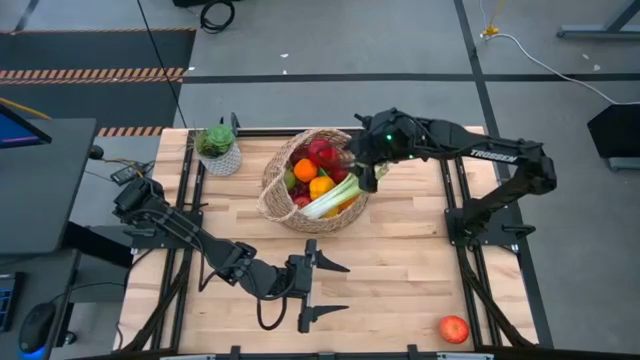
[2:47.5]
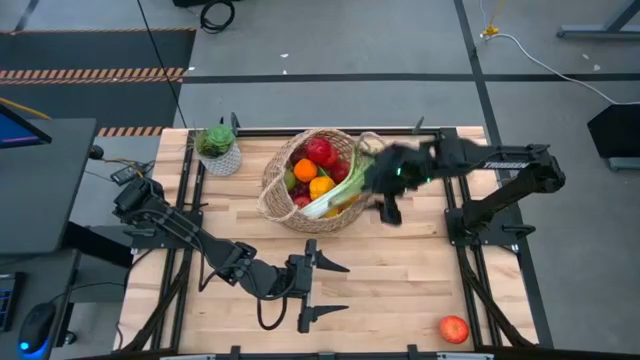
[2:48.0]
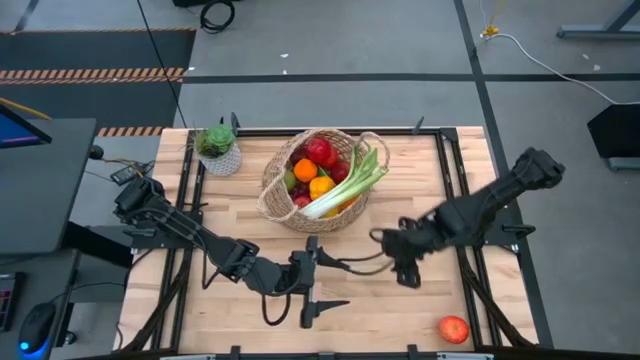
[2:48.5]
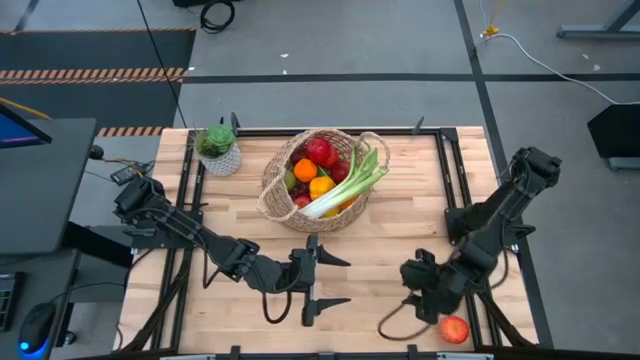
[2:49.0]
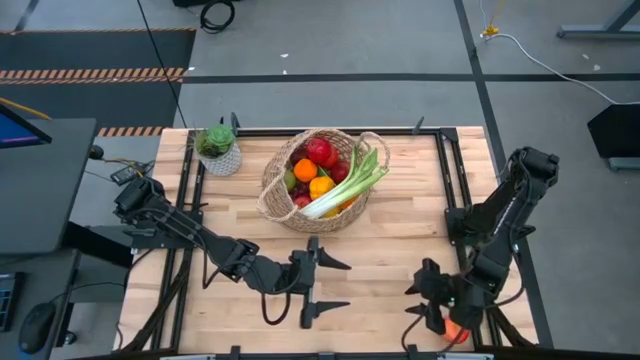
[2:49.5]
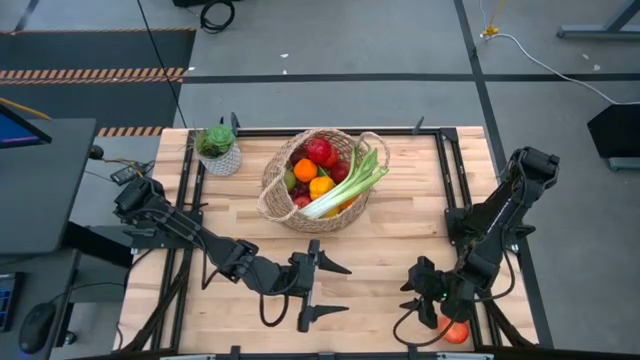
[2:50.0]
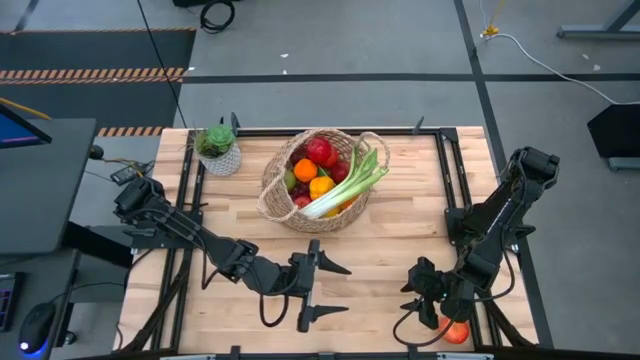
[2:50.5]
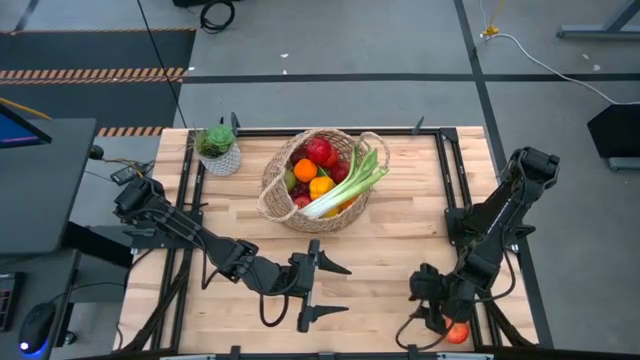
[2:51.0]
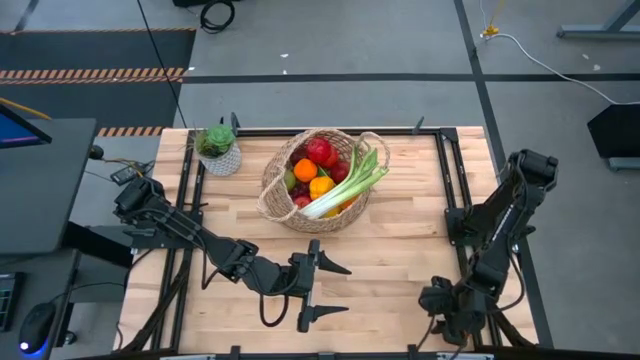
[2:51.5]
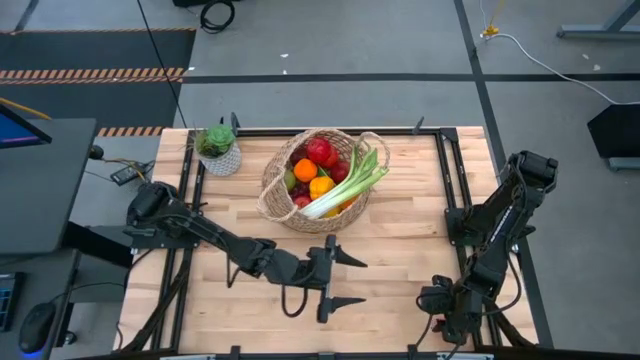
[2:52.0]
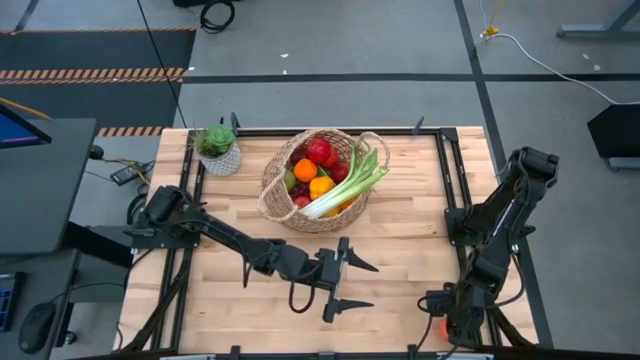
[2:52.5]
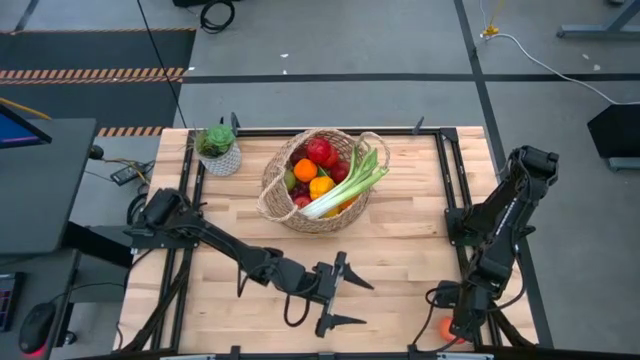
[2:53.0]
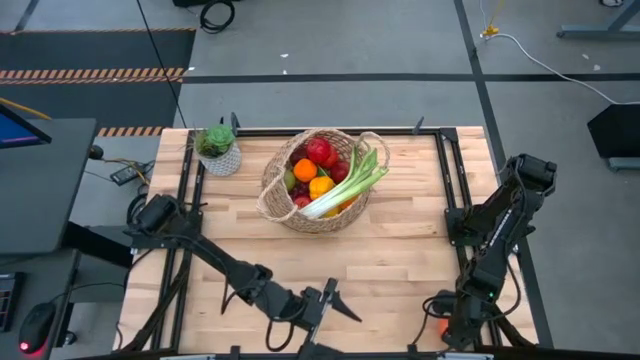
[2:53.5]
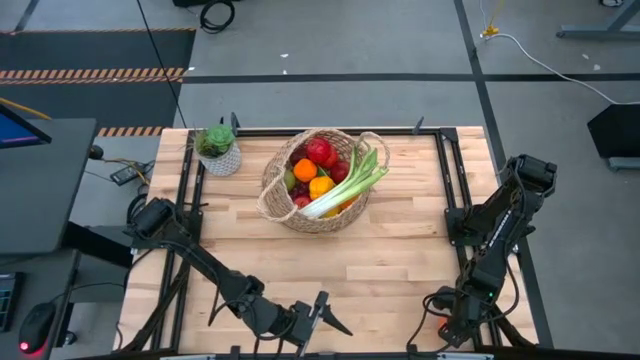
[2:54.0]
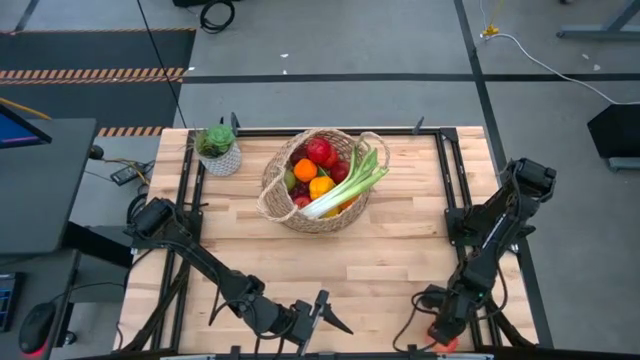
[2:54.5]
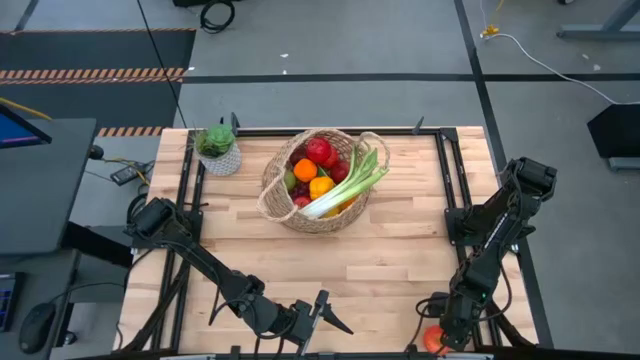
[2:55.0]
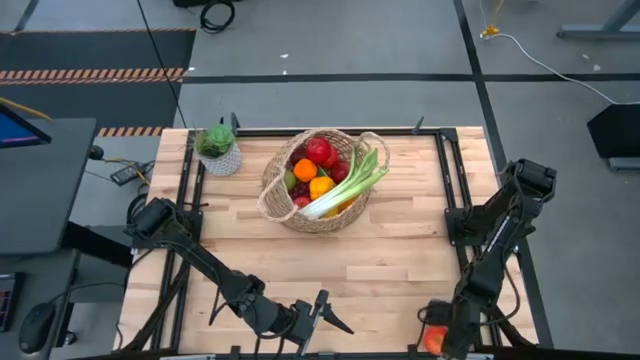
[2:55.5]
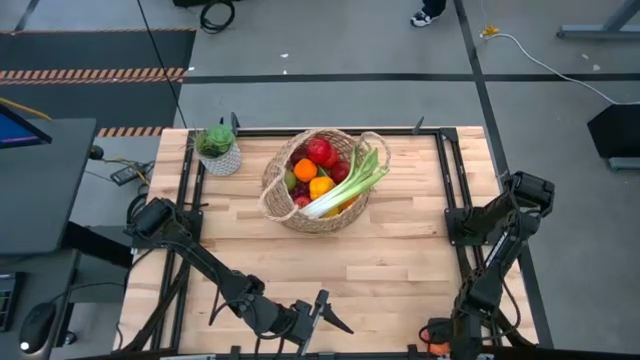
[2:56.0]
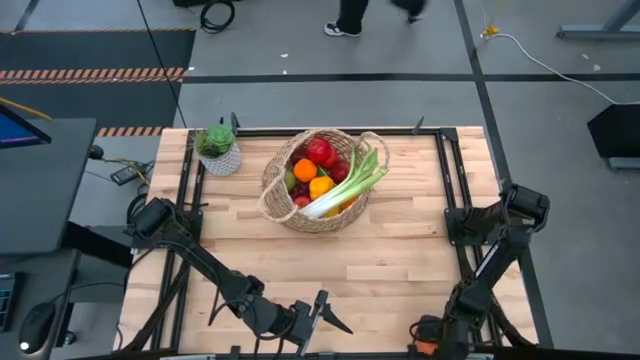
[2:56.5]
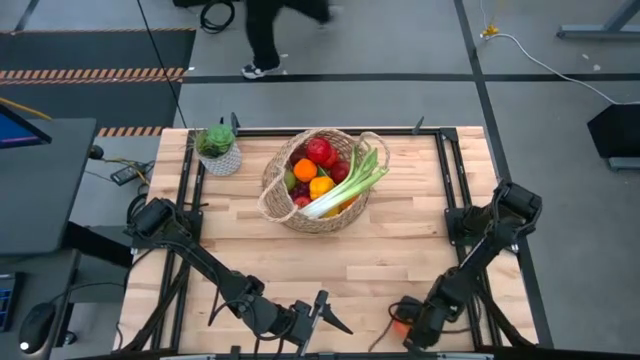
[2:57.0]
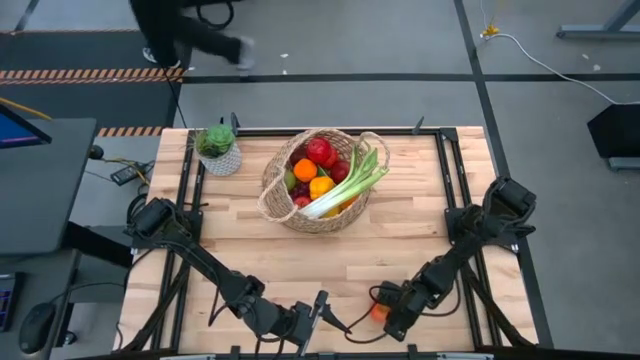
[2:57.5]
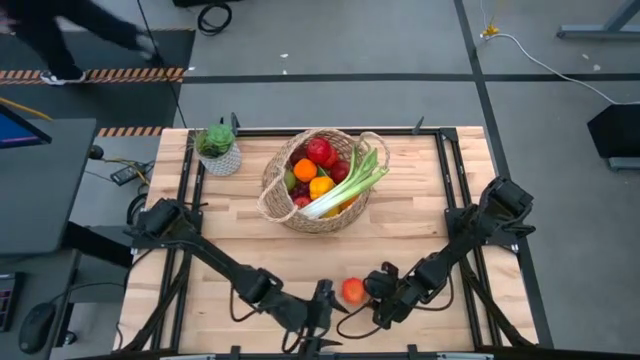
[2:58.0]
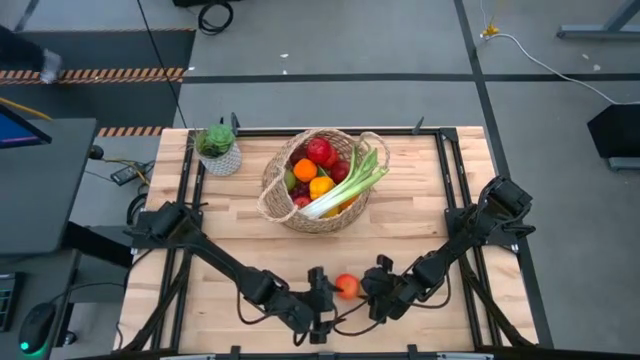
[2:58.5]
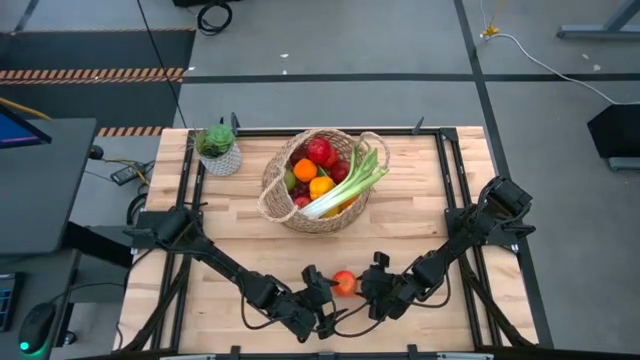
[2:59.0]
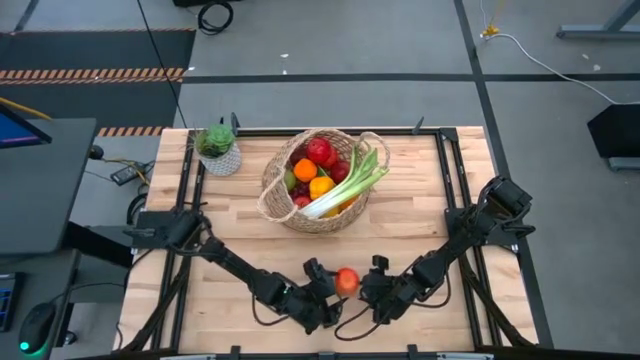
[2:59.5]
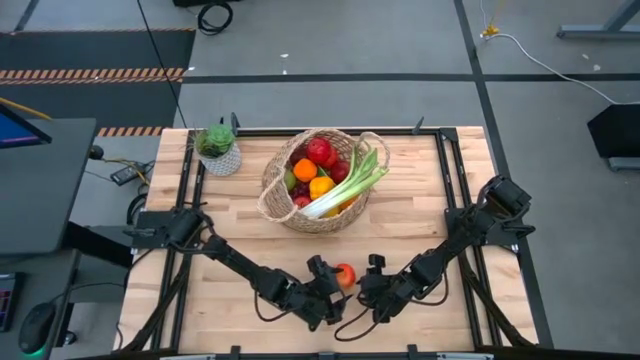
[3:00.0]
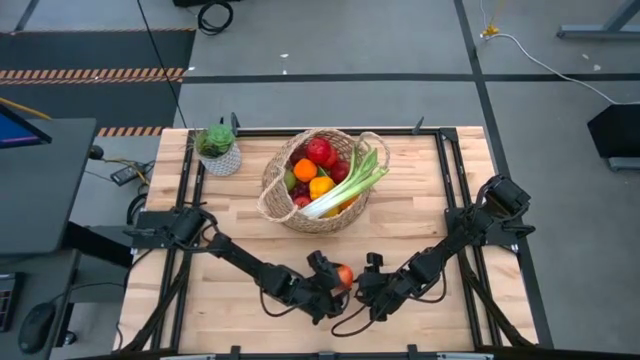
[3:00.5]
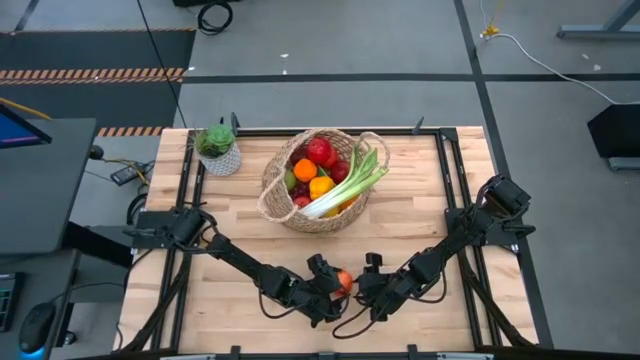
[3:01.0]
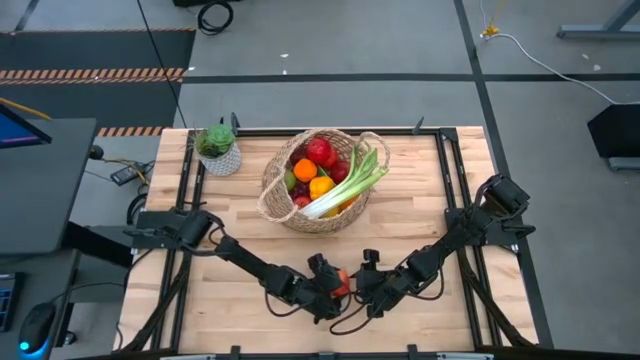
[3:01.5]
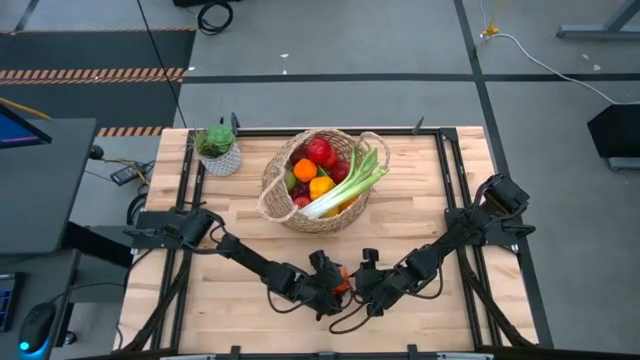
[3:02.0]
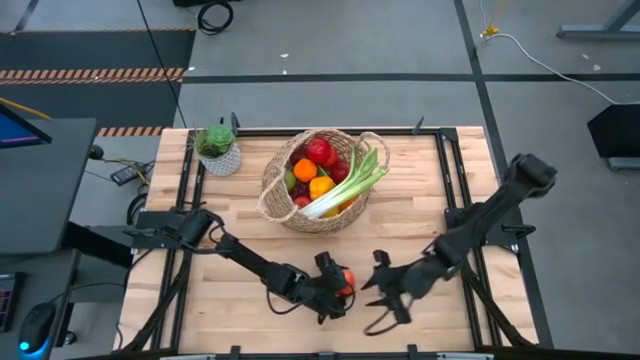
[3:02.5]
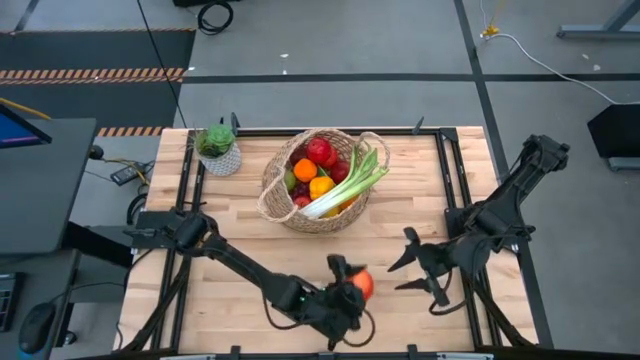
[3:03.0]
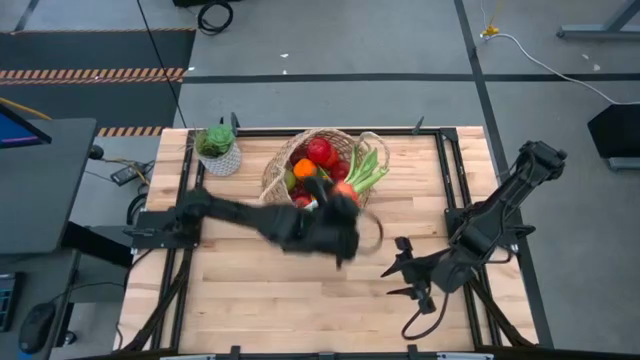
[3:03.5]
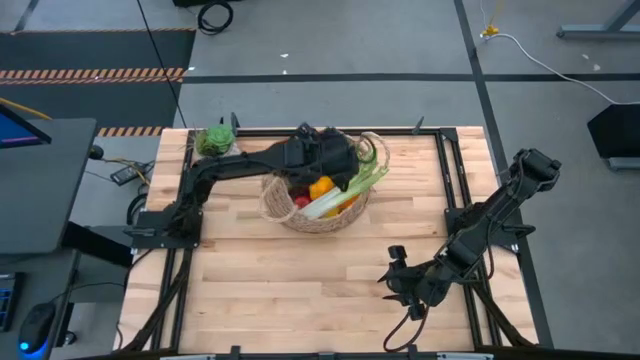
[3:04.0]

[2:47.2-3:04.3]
Task: Build produce basket
Put the apple into the basket

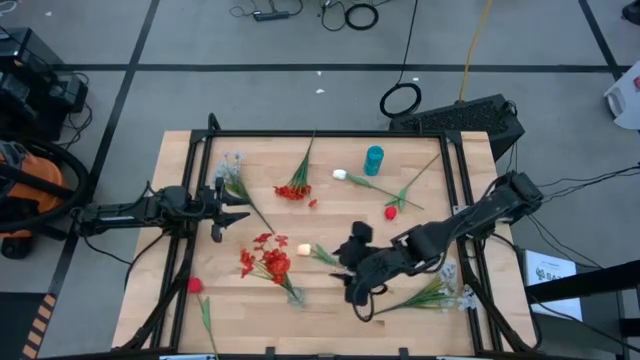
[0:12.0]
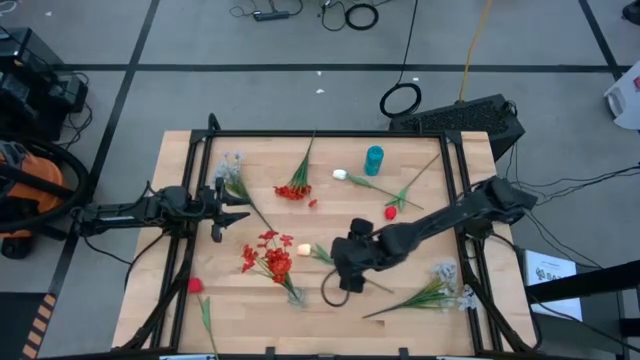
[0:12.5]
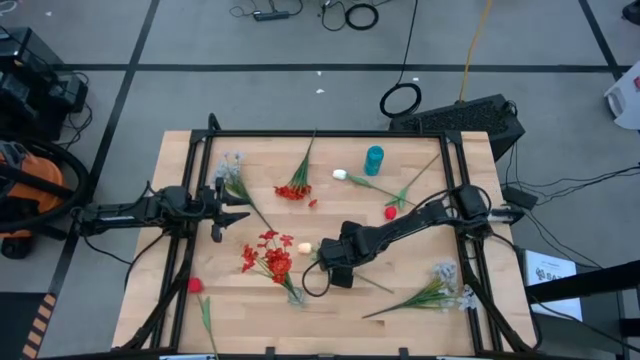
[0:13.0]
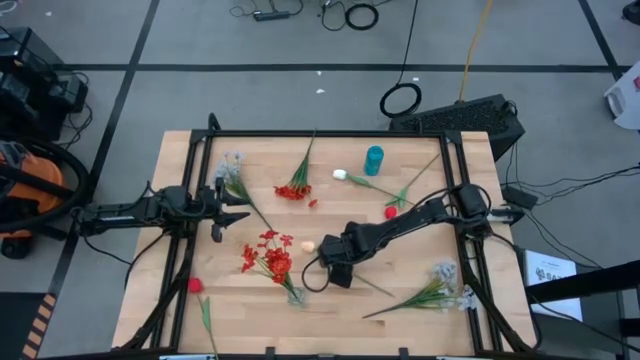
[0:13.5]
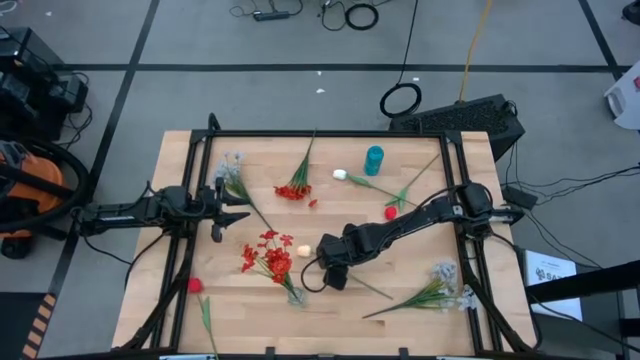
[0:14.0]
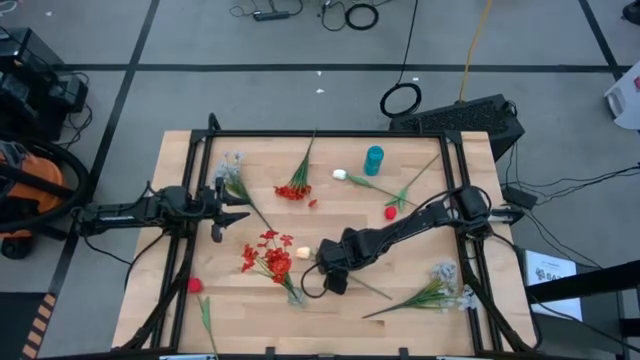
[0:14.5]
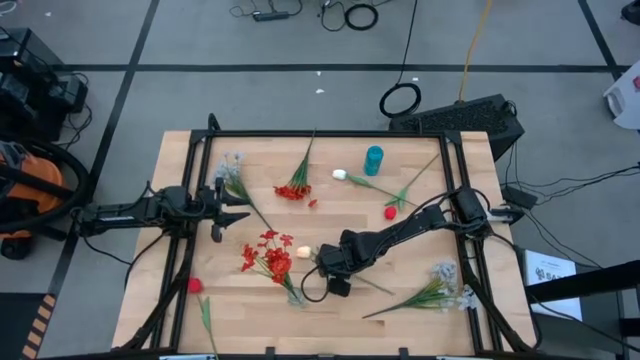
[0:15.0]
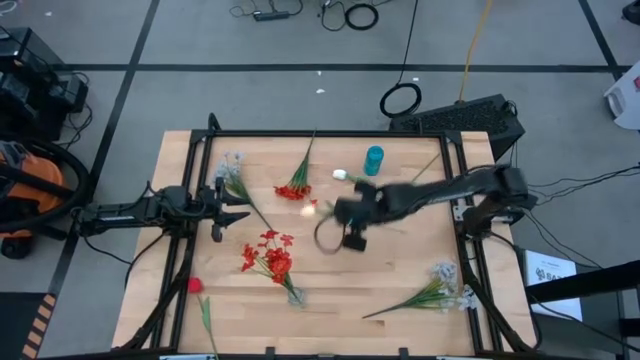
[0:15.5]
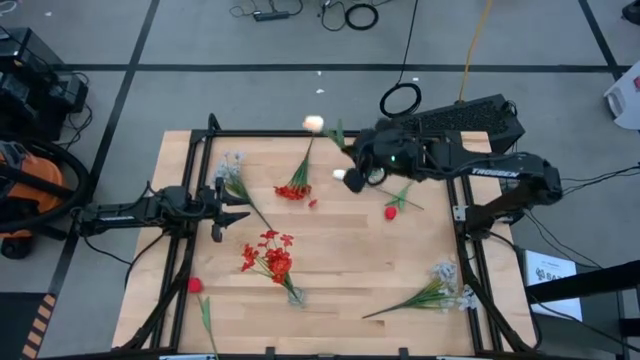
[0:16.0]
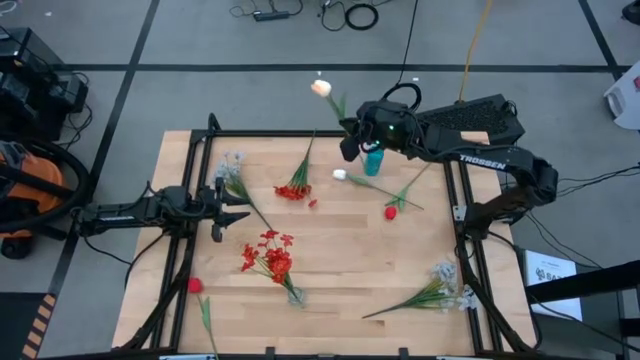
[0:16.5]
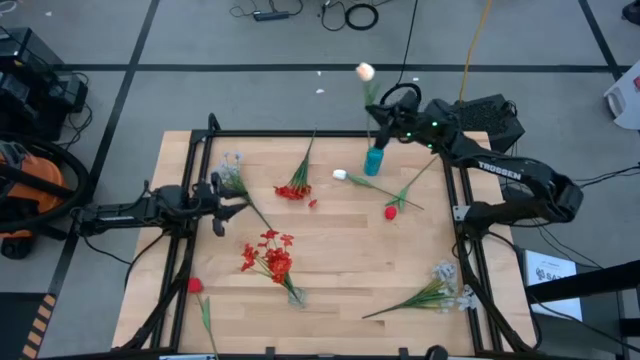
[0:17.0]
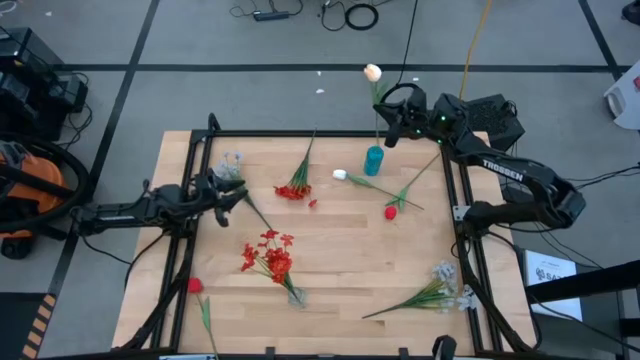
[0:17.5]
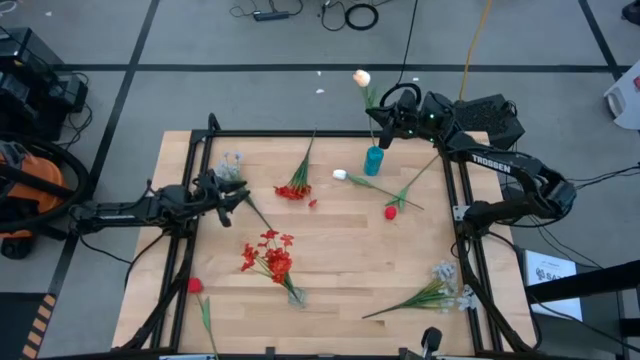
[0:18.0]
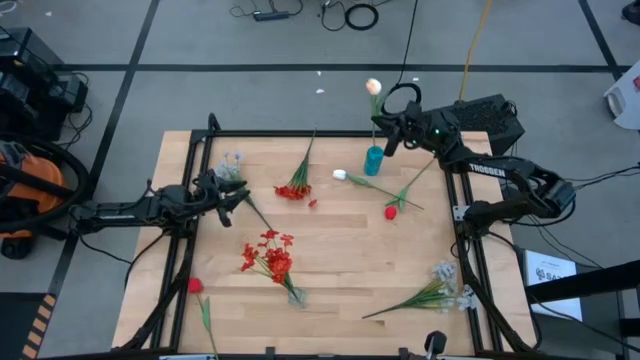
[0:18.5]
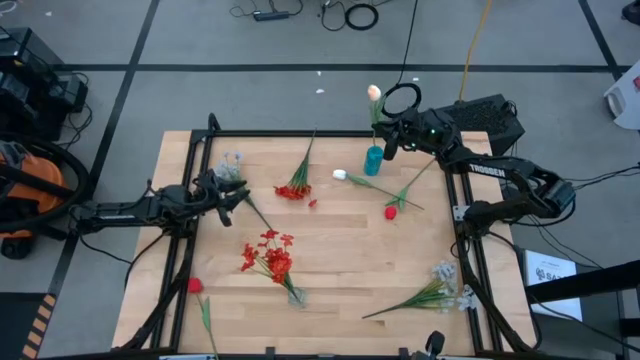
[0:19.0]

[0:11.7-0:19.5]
Task: Sort flowers into vase by color
Put the yellow flower into the blue vase
